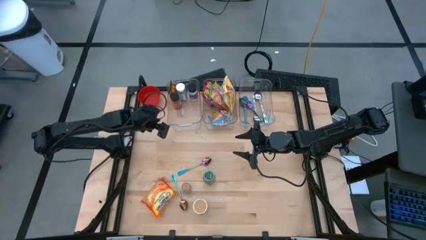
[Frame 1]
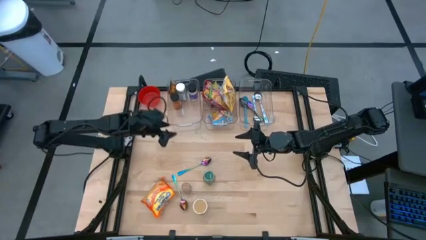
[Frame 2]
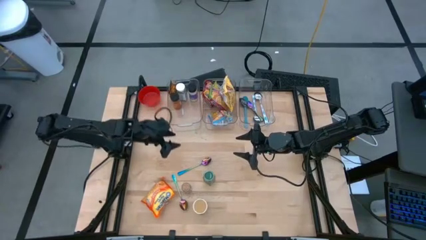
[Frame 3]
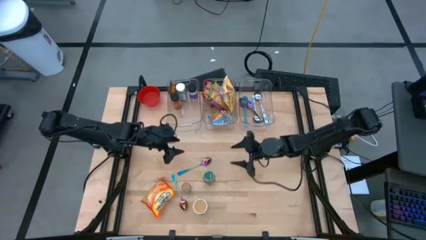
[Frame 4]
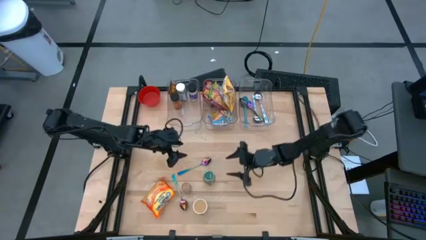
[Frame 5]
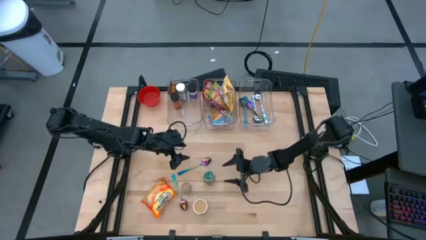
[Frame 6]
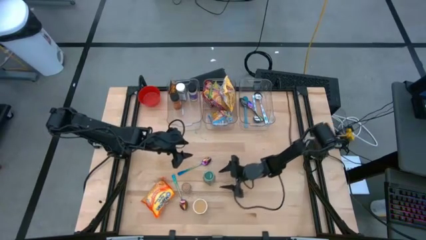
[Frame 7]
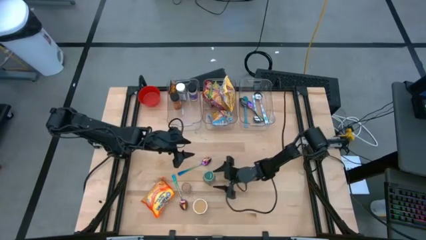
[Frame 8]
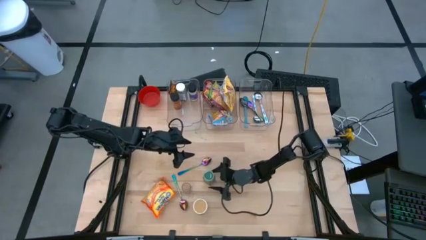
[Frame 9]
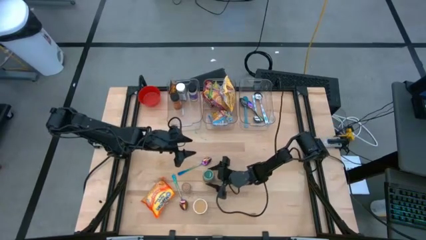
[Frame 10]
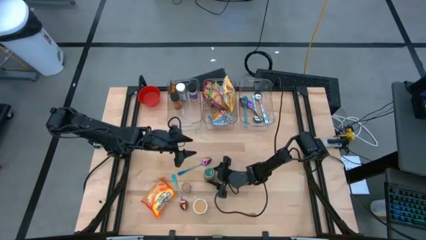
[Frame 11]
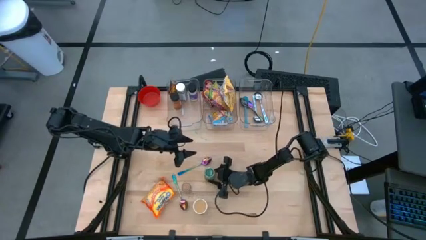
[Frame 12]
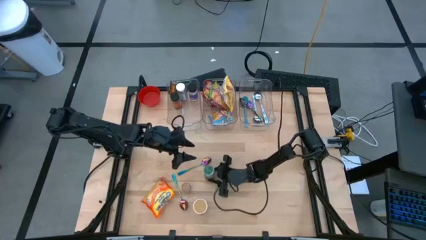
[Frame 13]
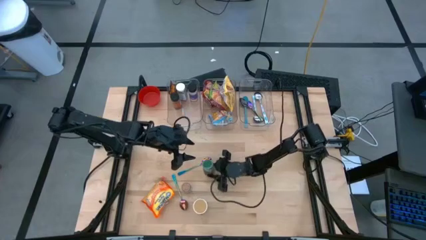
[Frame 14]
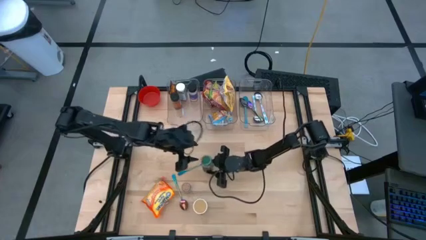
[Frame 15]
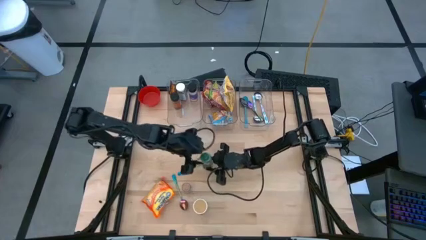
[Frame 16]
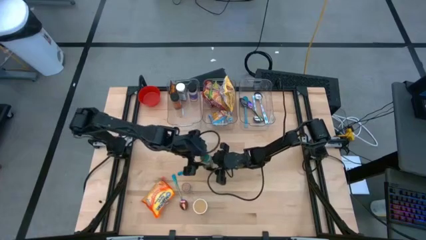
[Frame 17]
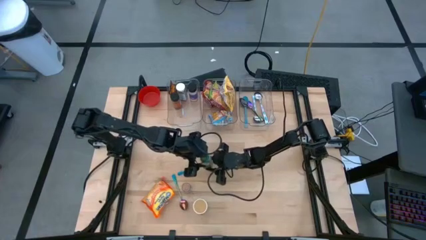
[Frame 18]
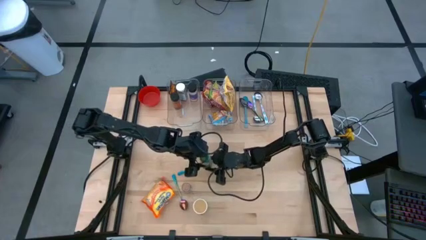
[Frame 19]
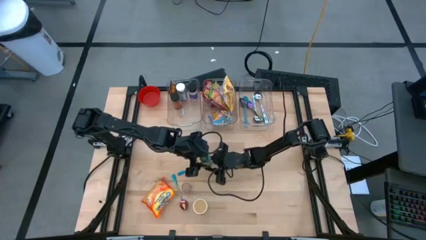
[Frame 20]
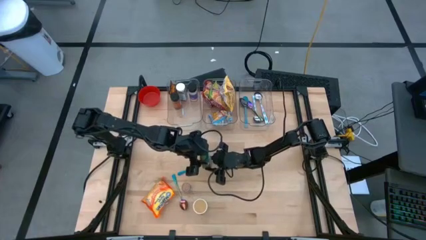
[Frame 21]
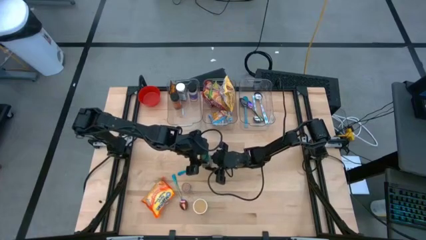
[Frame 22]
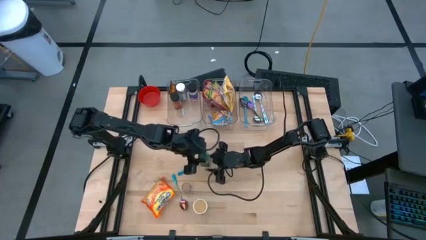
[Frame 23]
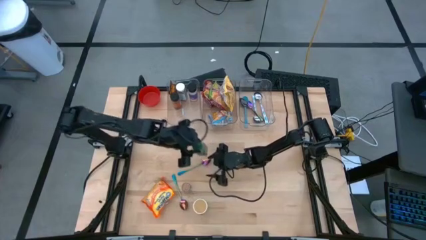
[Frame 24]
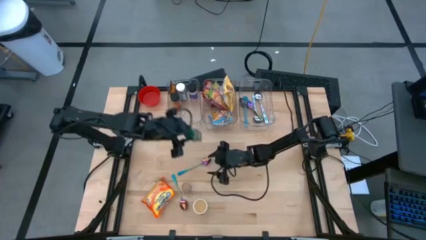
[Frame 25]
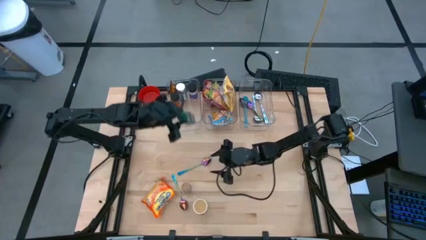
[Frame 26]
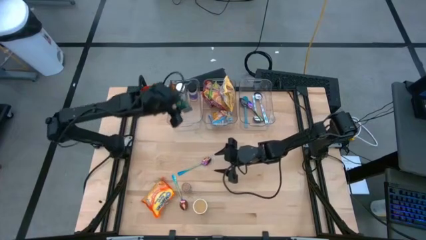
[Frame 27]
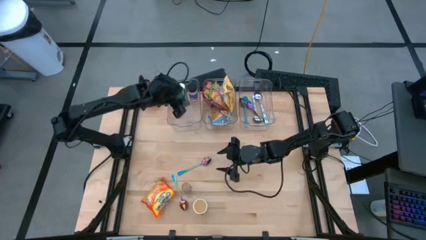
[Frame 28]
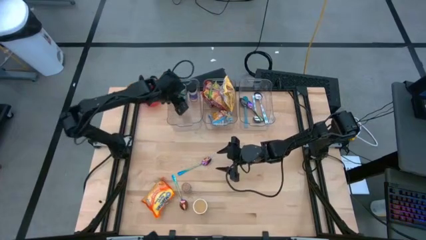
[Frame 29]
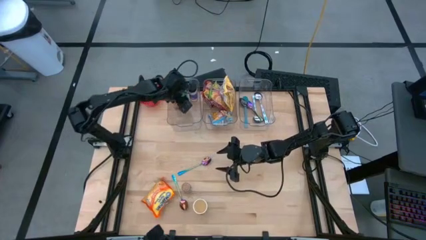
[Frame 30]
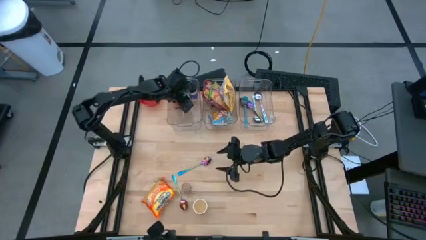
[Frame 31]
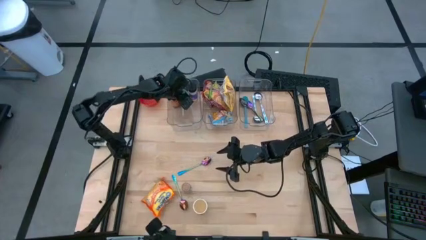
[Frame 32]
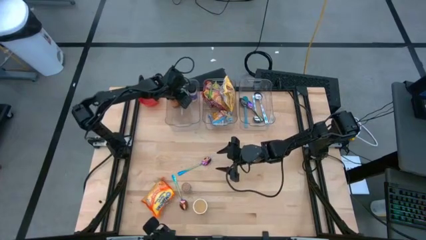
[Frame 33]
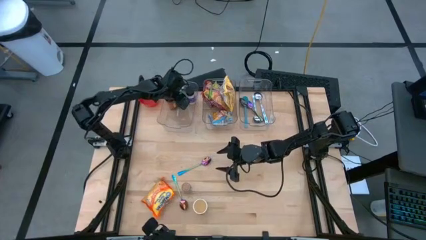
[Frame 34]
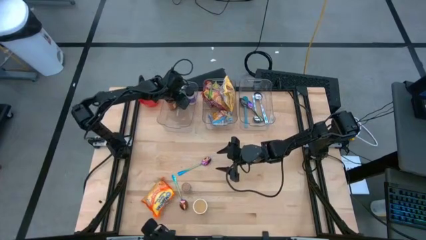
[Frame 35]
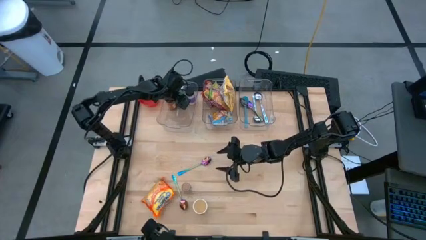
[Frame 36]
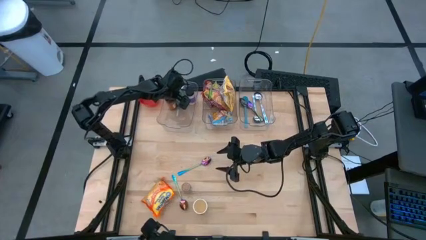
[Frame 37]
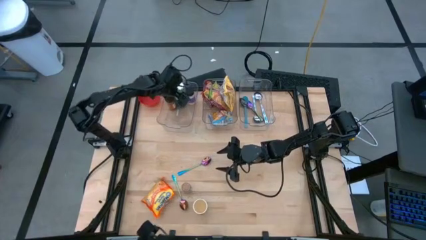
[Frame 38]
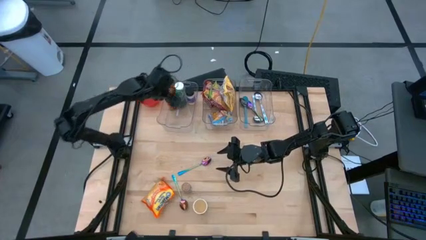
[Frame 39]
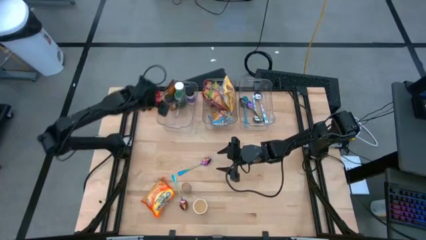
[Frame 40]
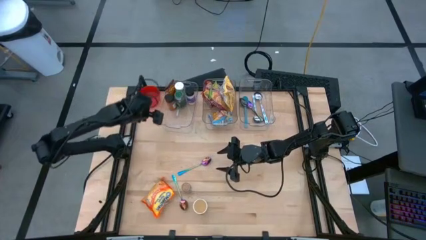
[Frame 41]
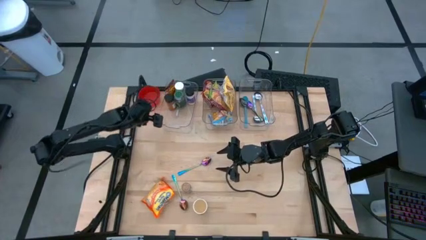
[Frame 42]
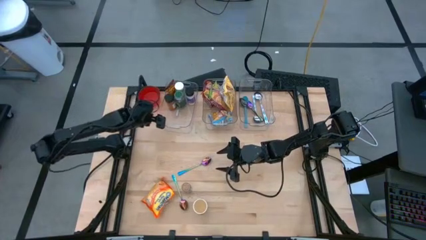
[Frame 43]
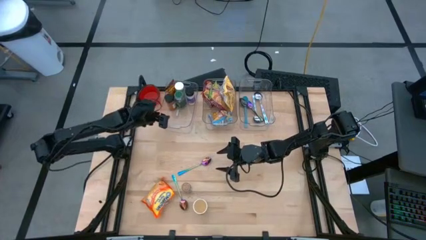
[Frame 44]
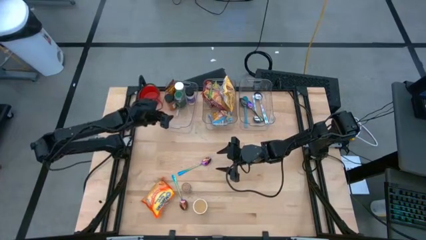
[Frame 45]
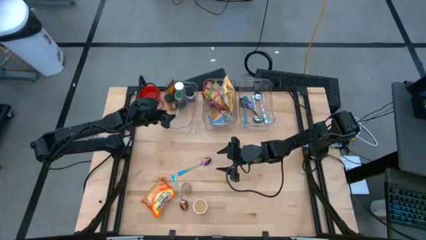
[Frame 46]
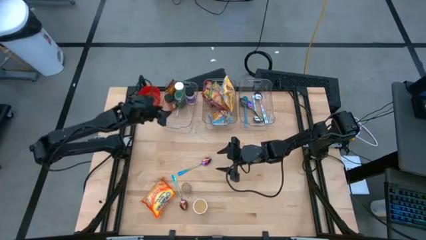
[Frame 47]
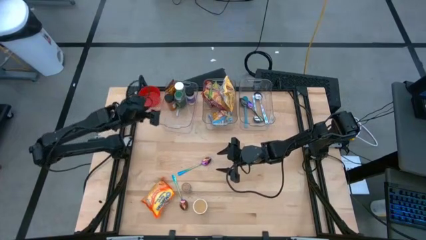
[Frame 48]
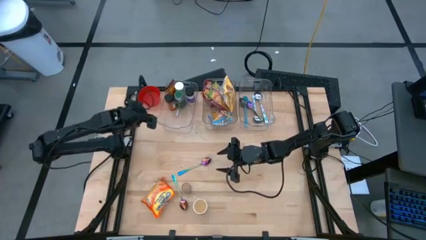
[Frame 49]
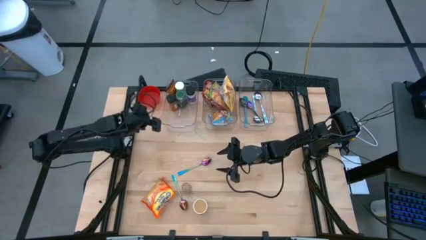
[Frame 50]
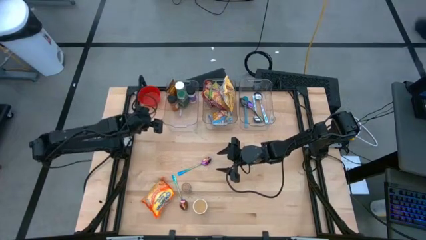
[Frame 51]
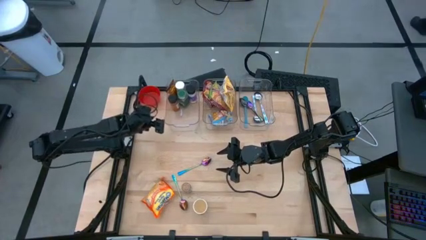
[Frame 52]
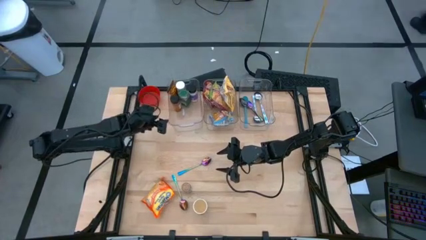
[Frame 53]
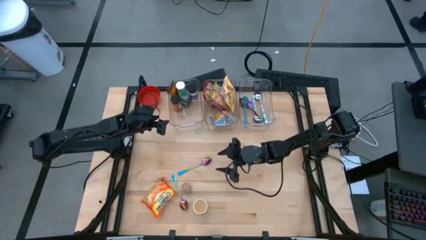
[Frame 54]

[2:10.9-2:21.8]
Task: Pick & Place Food Item
Put the green seasoning bottle into the left transparent bin

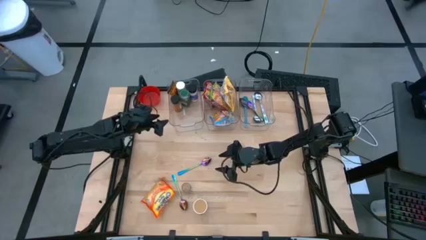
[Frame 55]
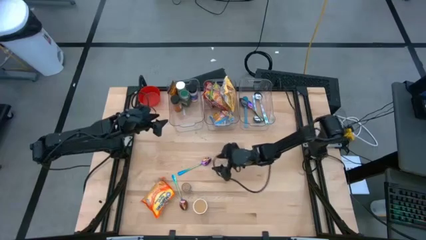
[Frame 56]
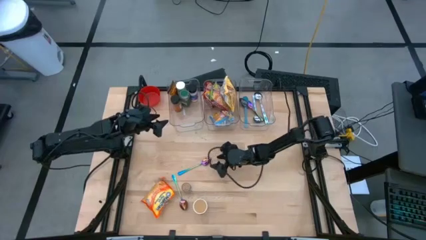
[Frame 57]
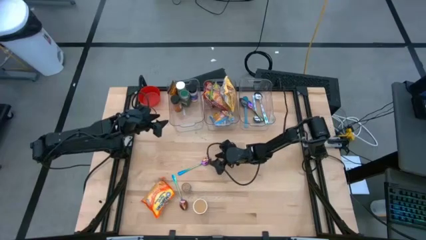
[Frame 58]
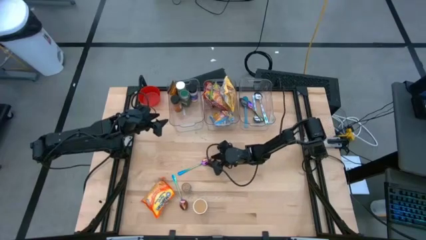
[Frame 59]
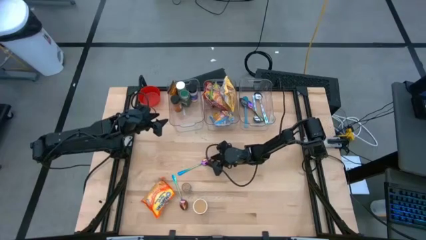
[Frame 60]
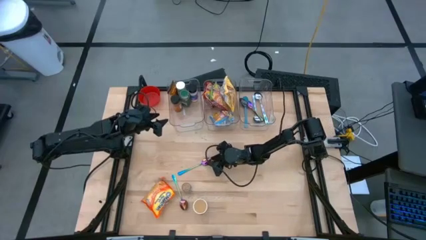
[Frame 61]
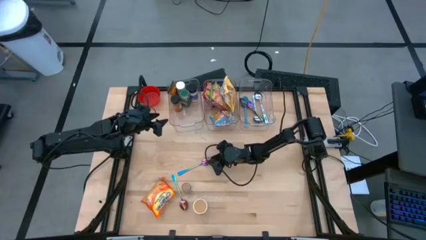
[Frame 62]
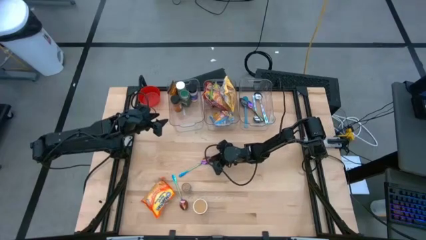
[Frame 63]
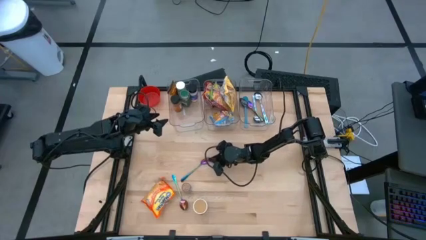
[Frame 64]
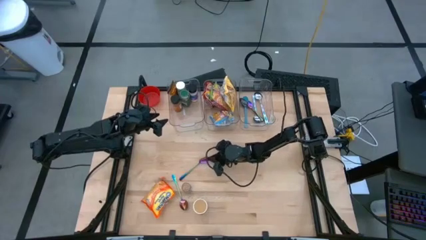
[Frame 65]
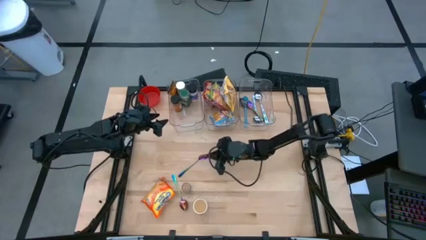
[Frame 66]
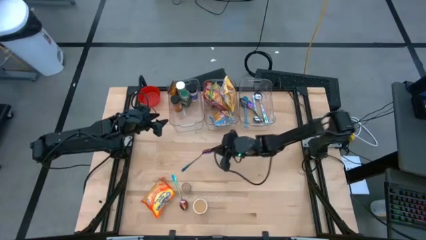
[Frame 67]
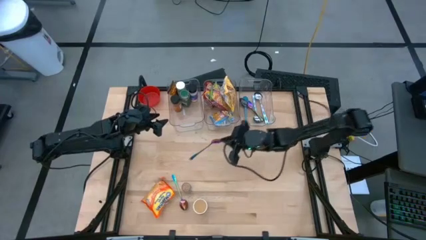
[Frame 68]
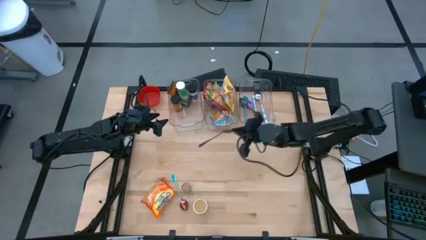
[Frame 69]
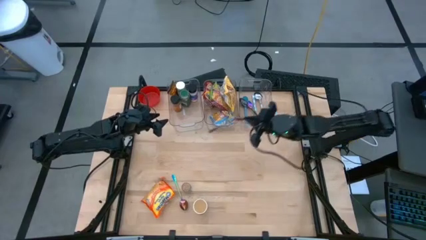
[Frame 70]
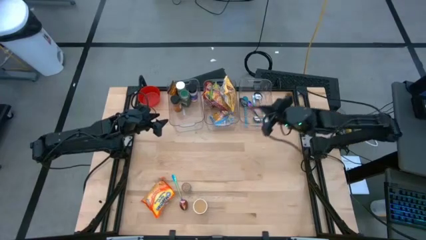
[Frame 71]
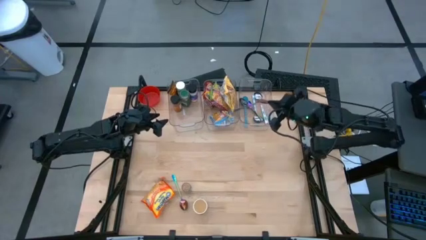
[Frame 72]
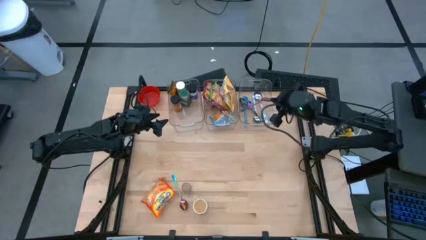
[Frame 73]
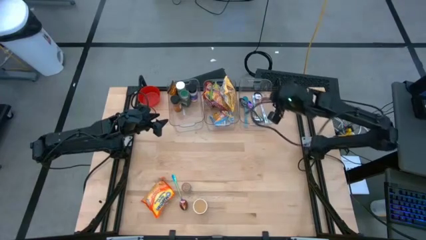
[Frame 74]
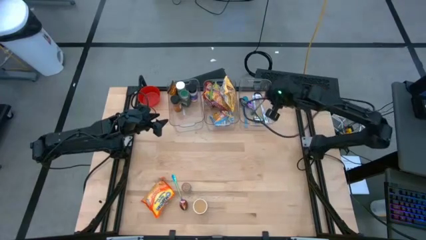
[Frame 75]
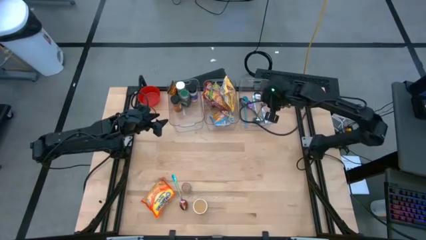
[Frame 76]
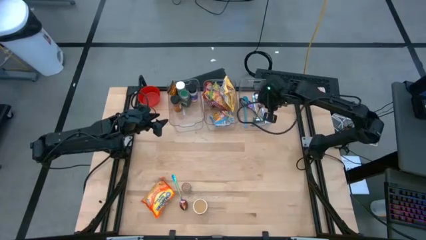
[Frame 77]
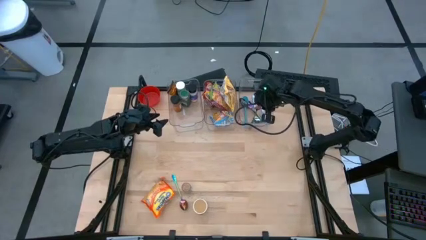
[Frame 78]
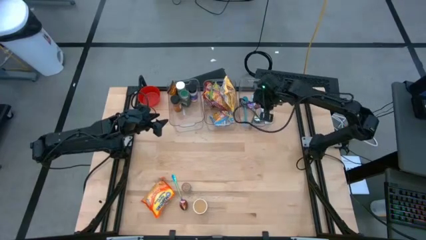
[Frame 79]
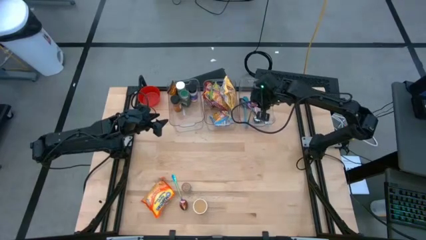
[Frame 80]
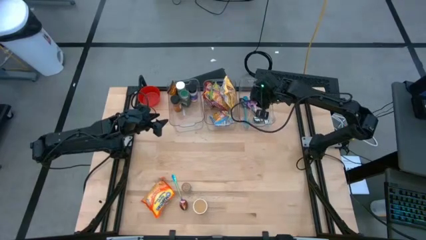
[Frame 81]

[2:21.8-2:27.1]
Put the top blue spoon into the right transparent bin
